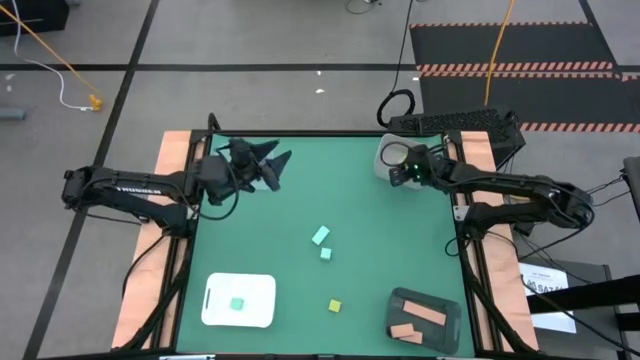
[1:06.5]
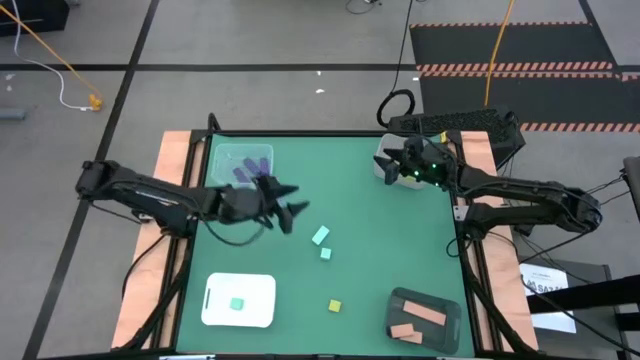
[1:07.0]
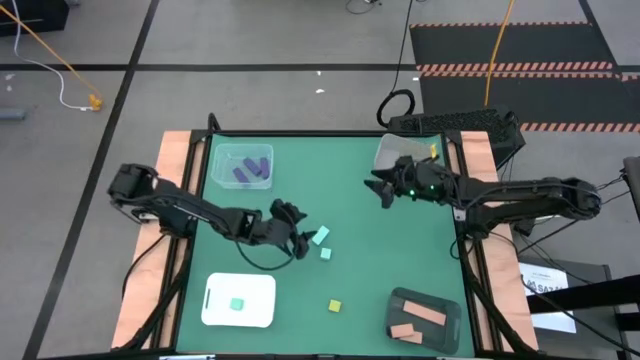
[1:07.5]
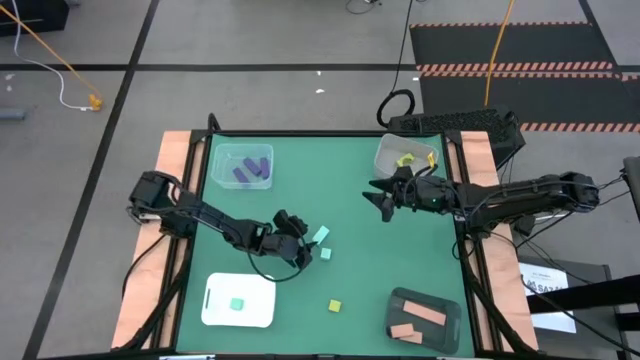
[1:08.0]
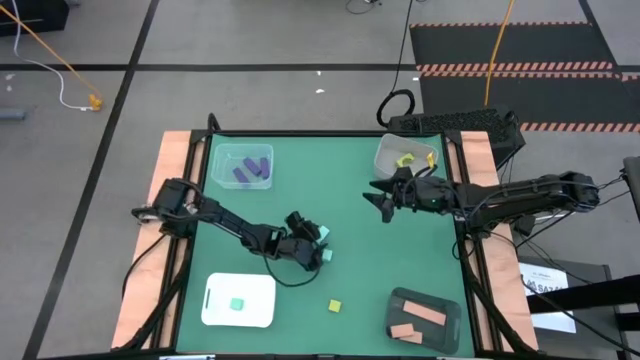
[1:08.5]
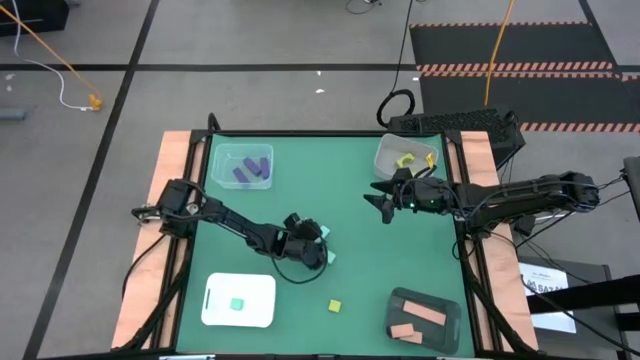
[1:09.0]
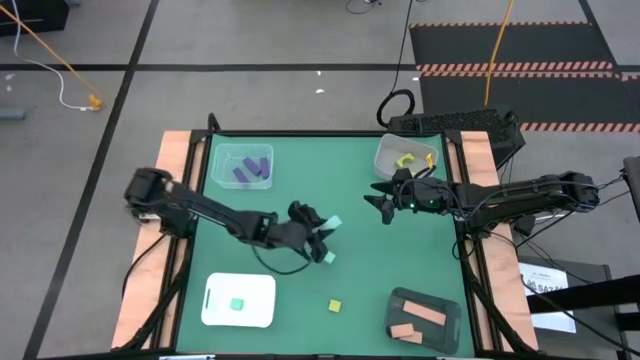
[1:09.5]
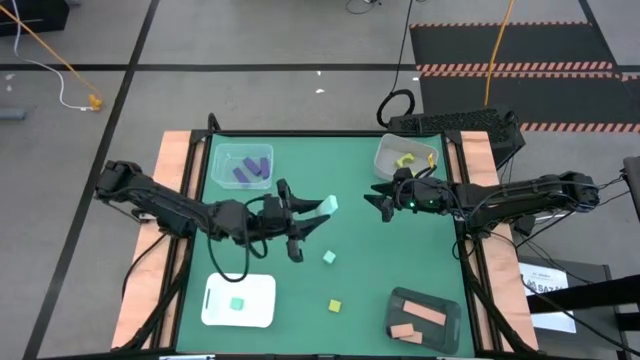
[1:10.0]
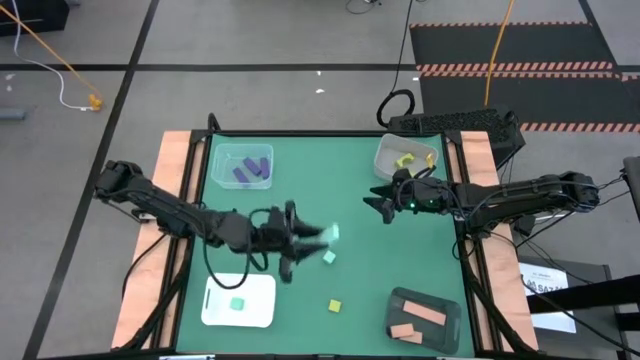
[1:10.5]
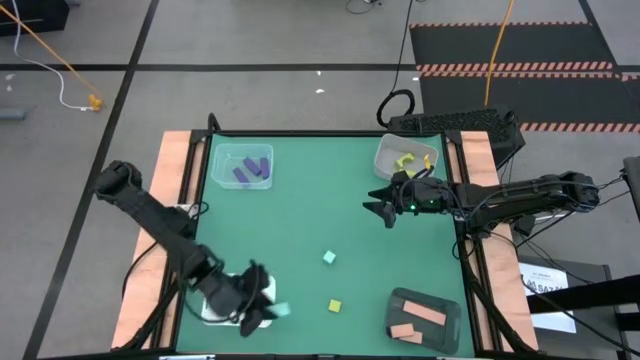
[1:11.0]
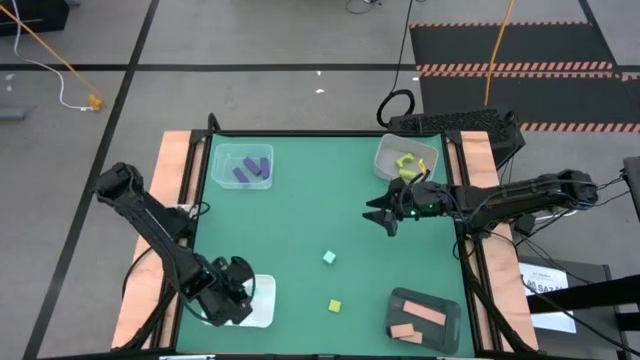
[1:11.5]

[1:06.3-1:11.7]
Task: Sort & place blocks by color
Put the top light blue block into the white bin

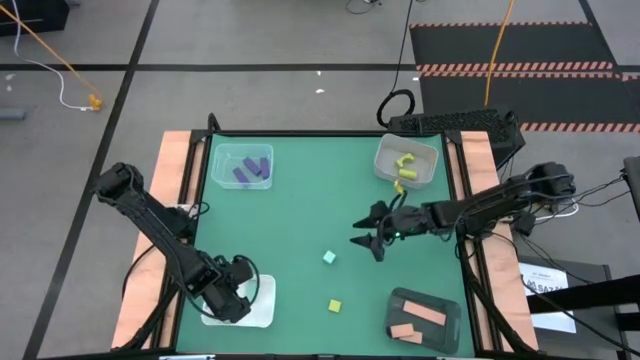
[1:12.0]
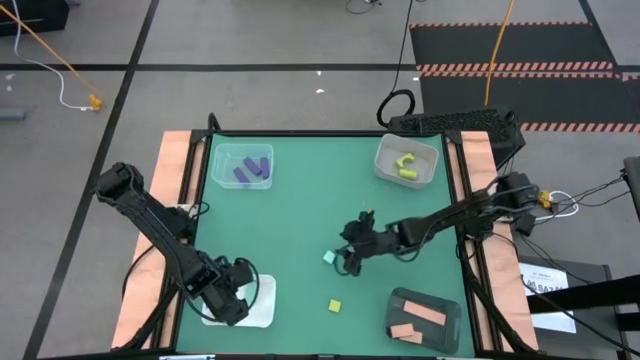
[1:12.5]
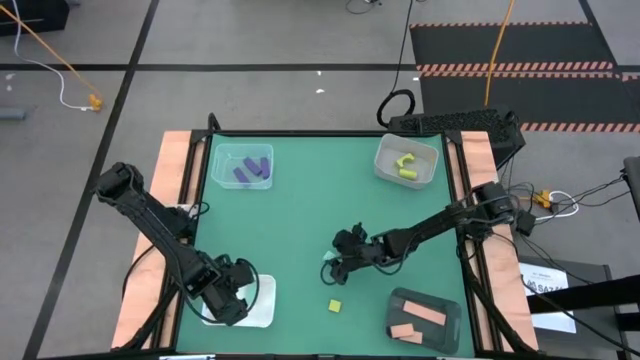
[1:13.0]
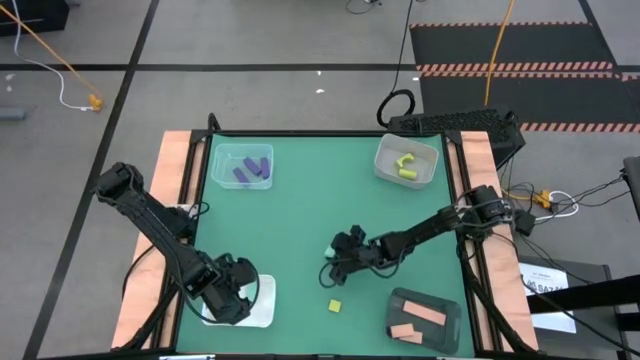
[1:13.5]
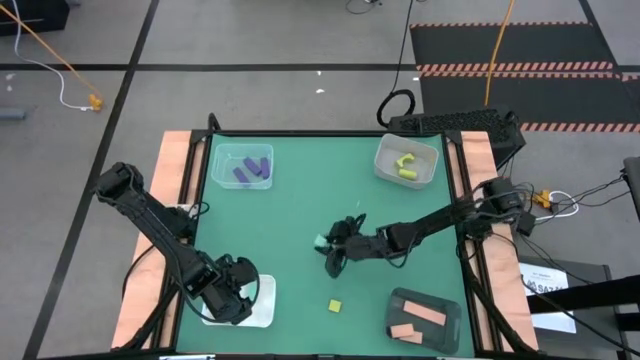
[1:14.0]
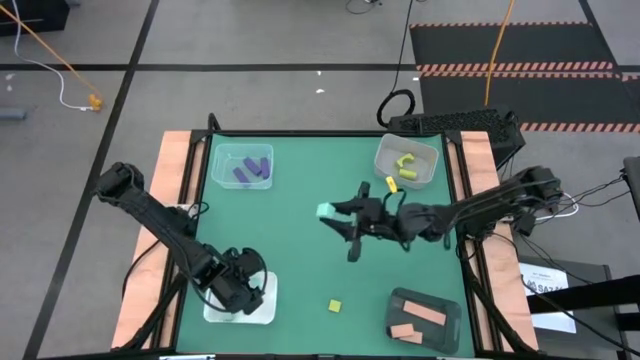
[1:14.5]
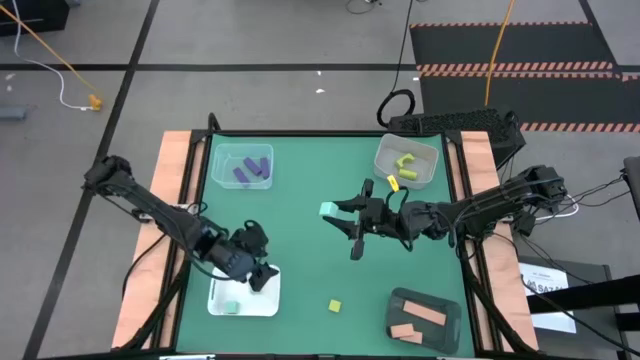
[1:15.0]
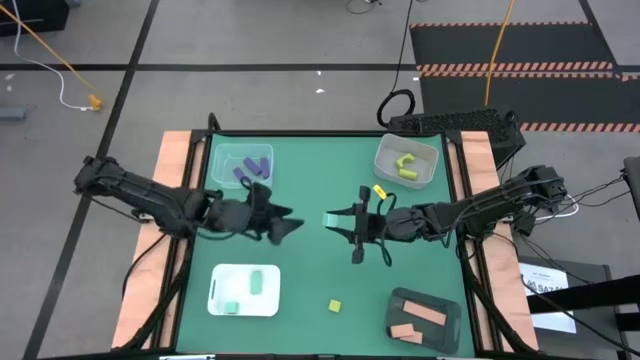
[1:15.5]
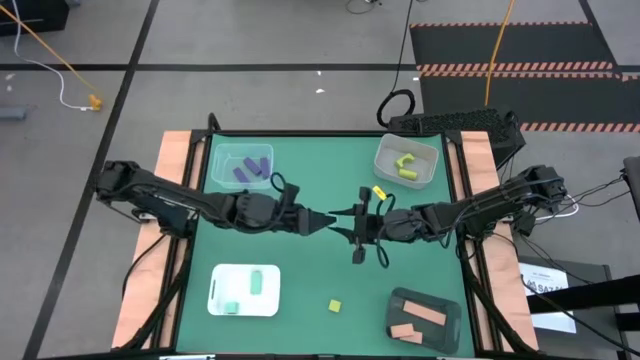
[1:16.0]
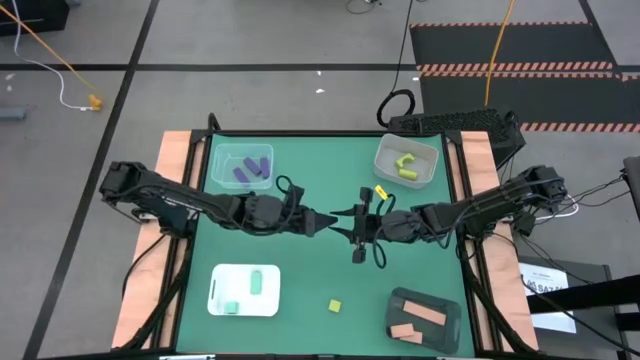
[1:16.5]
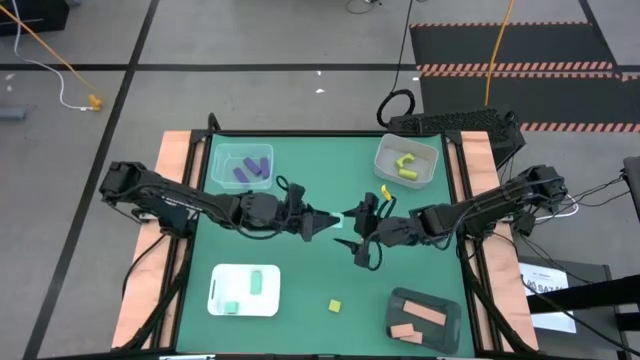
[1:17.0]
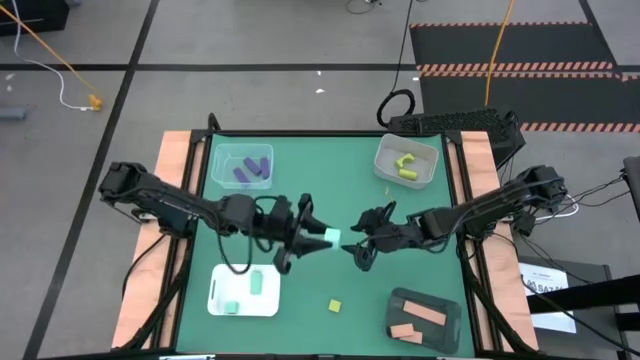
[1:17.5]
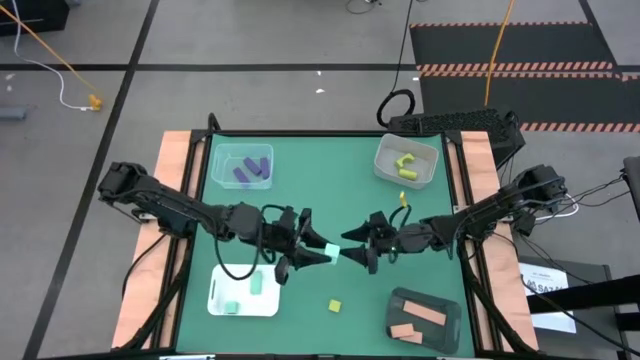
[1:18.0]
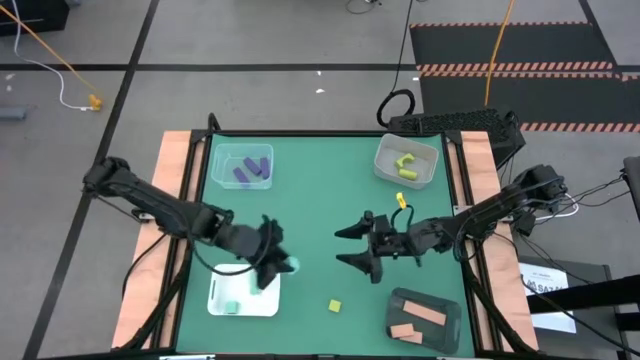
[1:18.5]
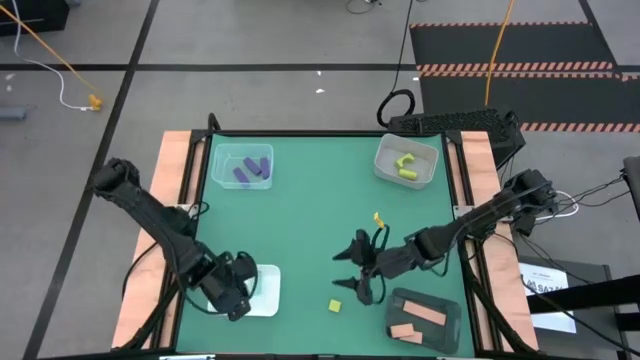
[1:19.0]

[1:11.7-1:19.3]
Put the light blue block into the white bin

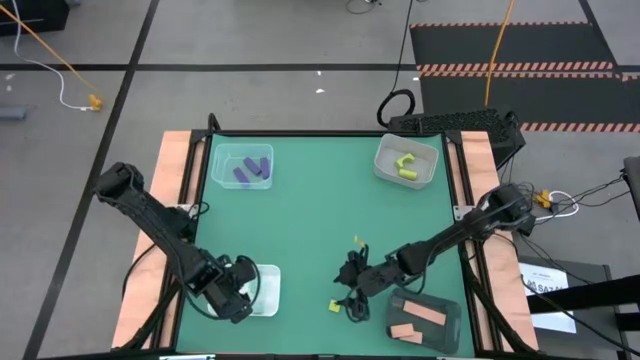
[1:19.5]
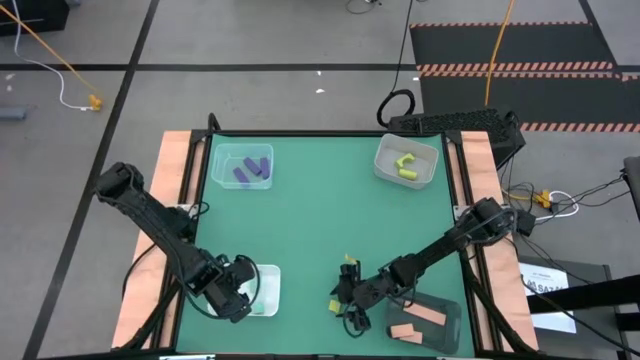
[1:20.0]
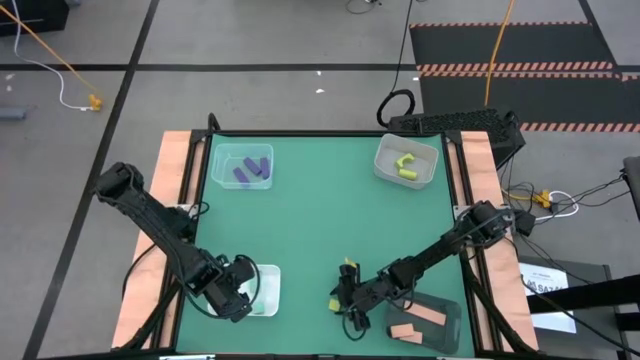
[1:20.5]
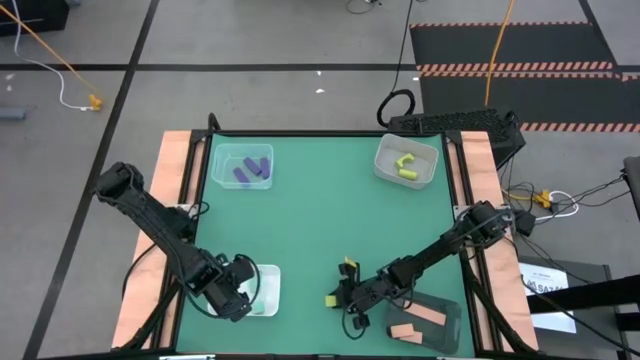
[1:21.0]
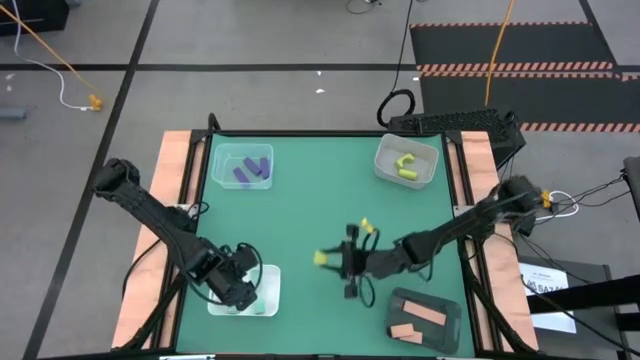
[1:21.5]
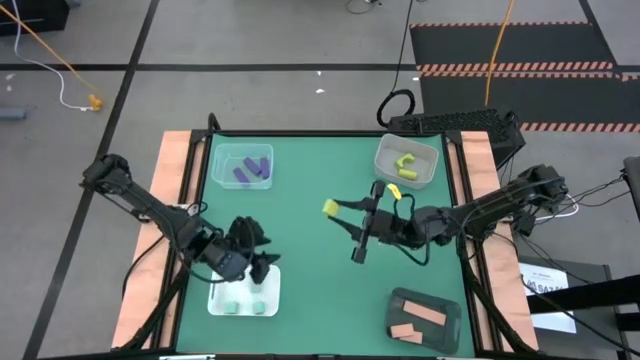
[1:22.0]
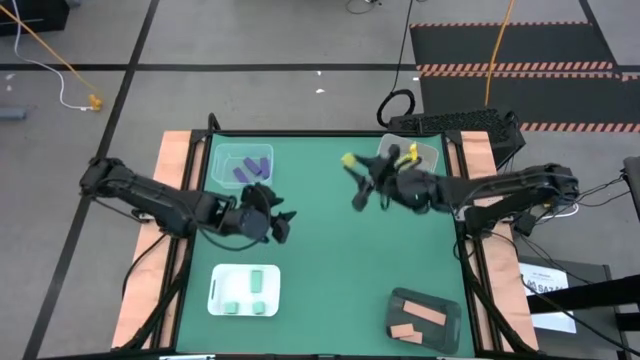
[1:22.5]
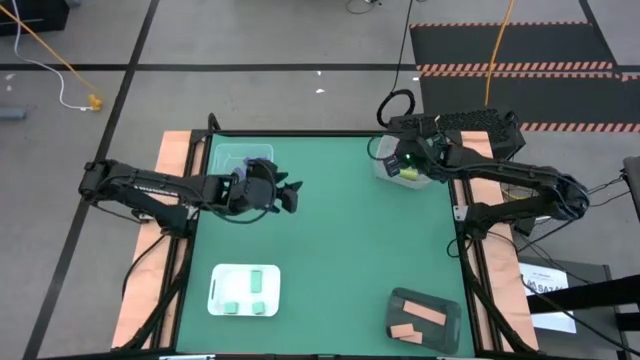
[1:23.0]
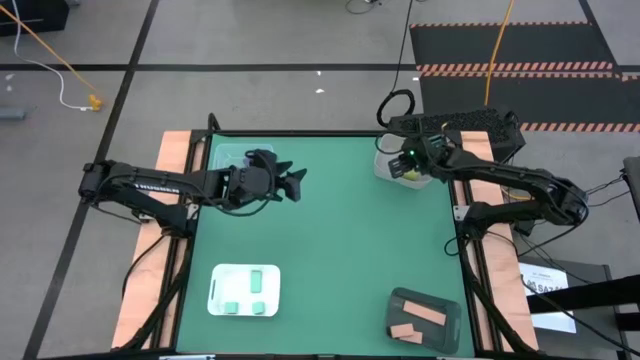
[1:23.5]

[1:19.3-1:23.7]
Put the light green block into the gray bin

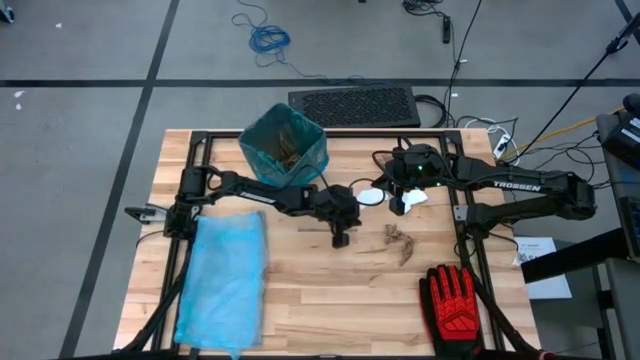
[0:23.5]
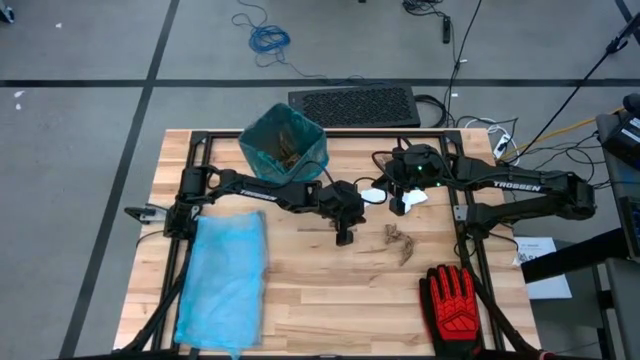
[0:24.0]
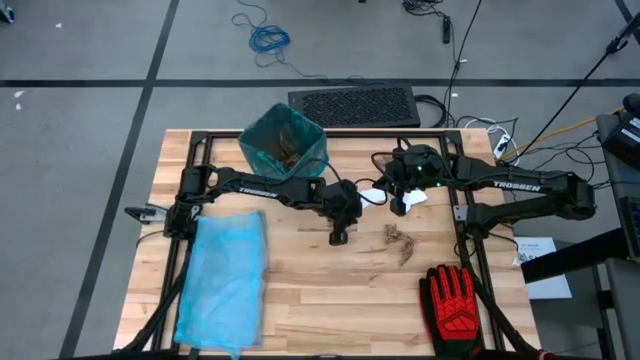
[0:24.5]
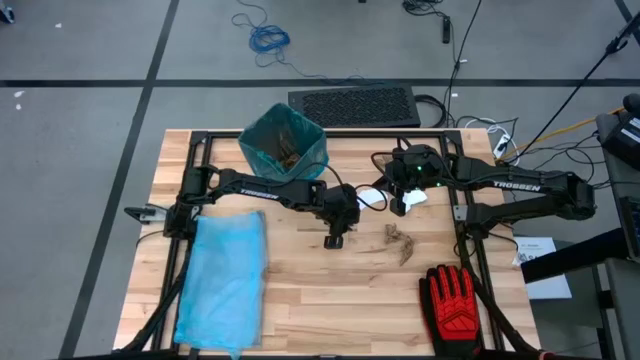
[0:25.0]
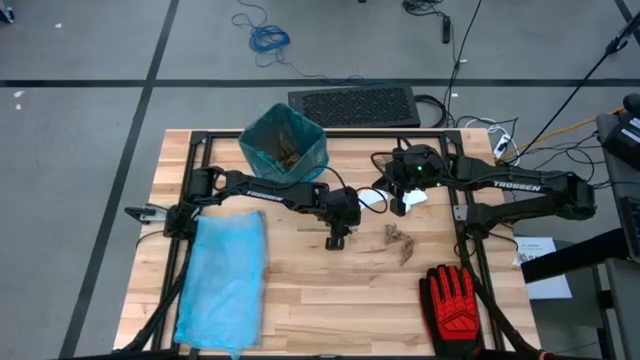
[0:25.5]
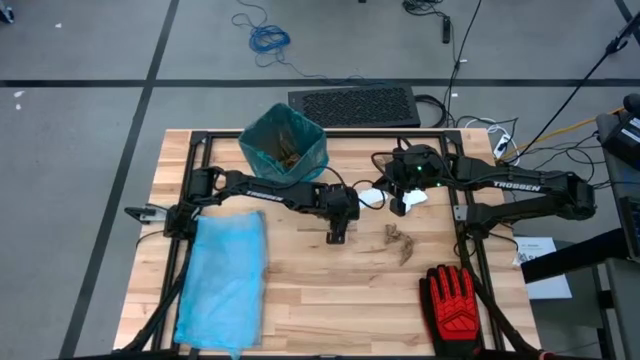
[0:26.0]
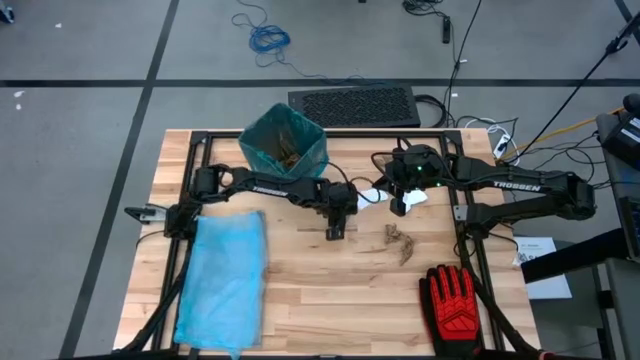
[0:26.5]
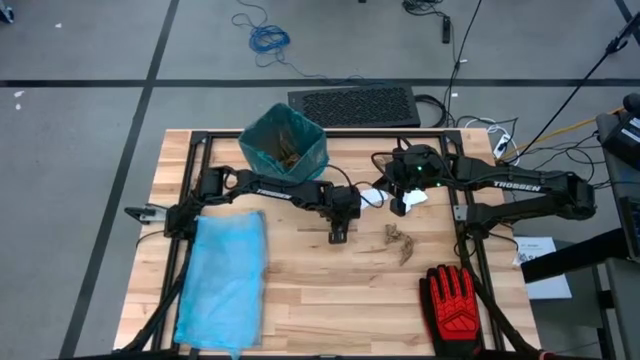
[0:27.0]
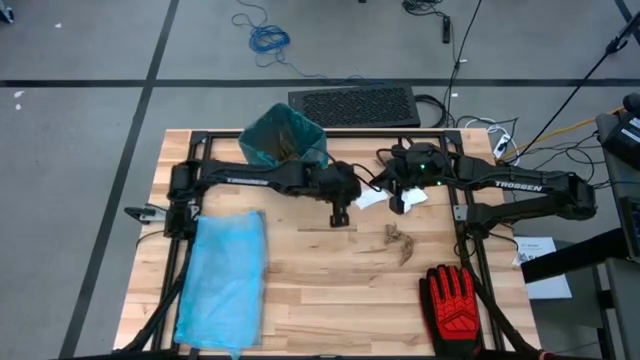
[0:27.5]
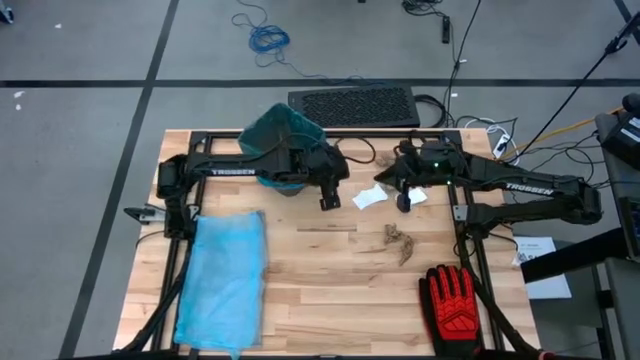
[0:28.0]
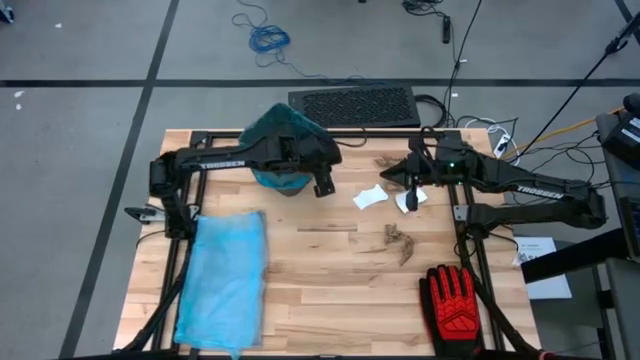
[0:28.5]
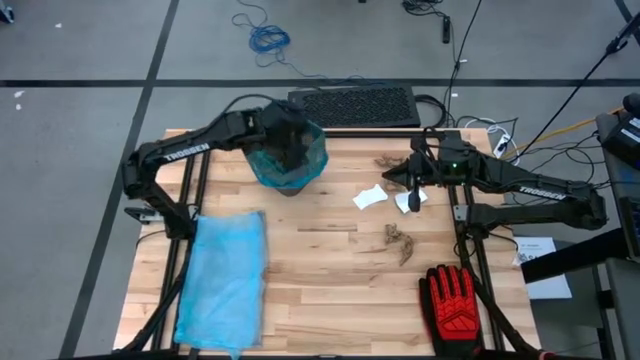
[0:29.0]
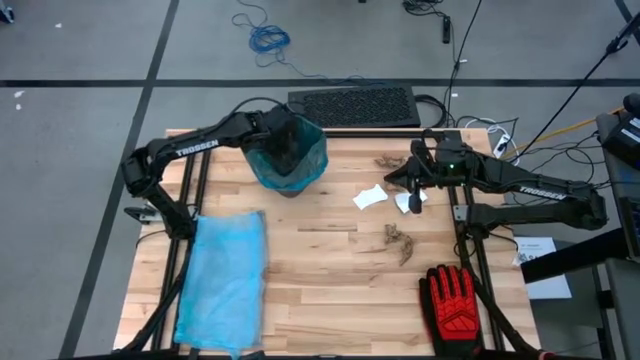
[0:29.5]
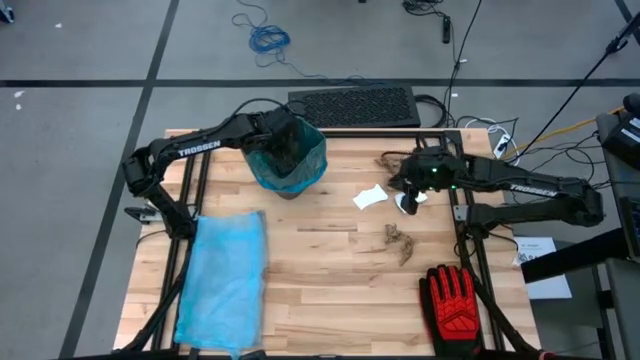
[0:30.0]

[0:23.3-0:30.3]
Task: place trash/remove bag and relplace
Put the brown napkin into the black trash bin
